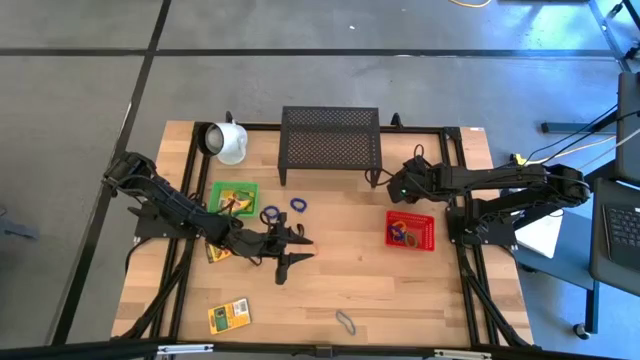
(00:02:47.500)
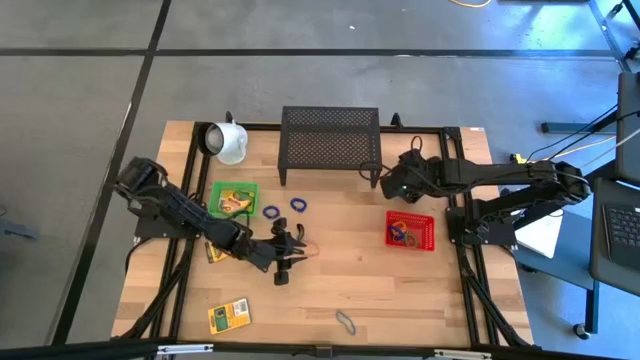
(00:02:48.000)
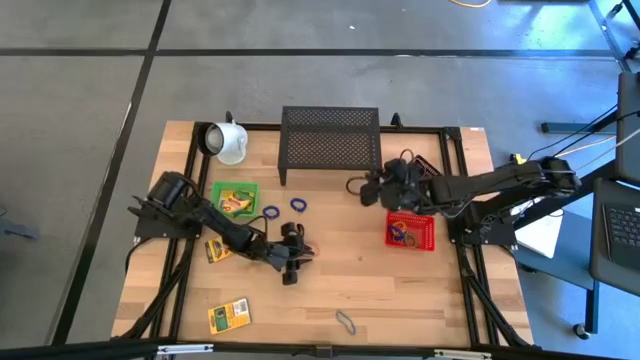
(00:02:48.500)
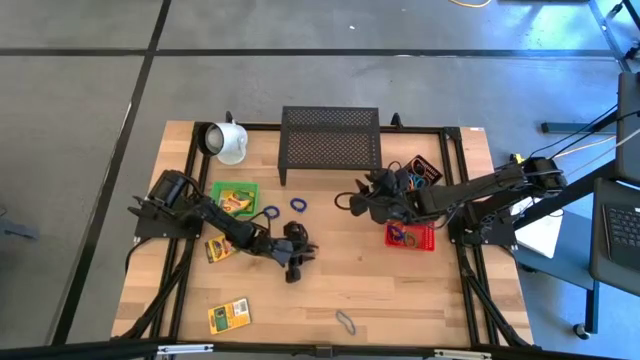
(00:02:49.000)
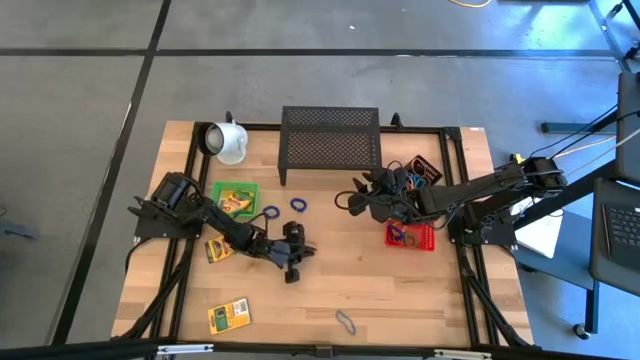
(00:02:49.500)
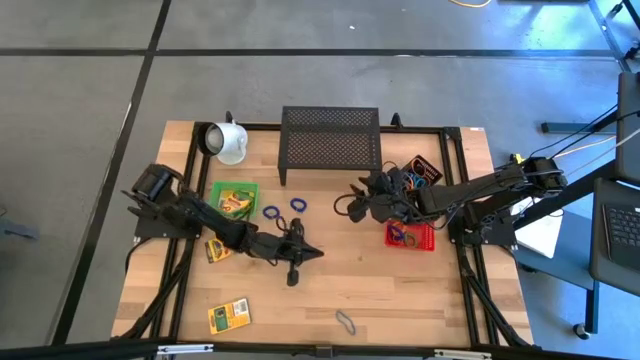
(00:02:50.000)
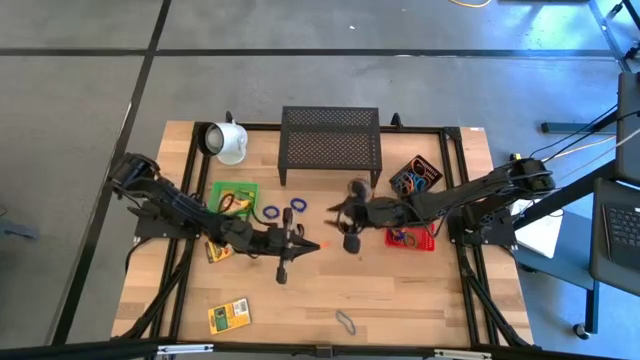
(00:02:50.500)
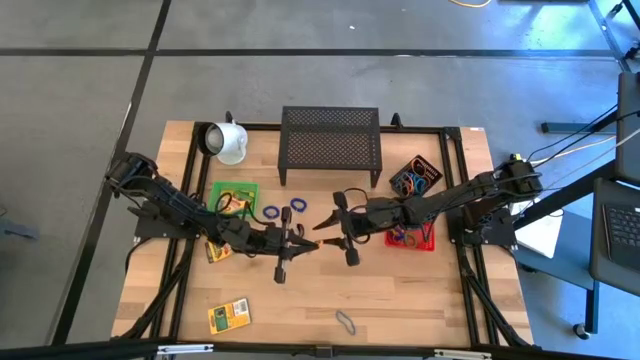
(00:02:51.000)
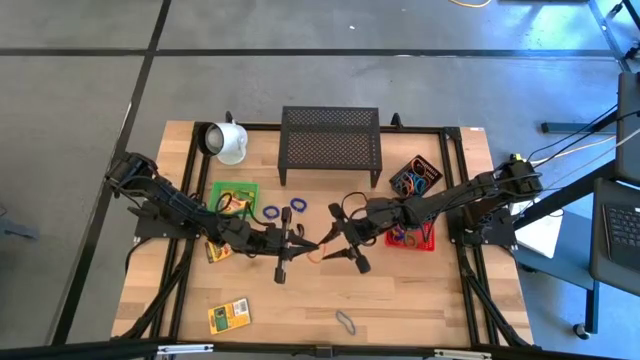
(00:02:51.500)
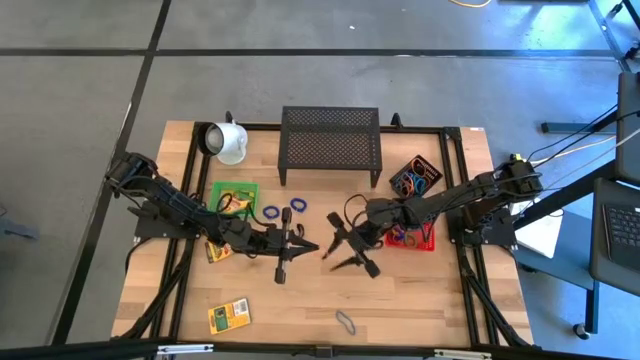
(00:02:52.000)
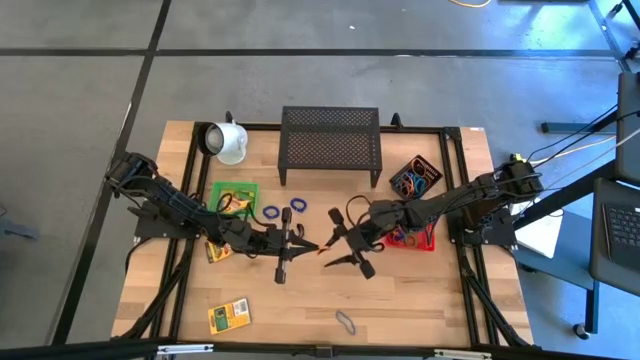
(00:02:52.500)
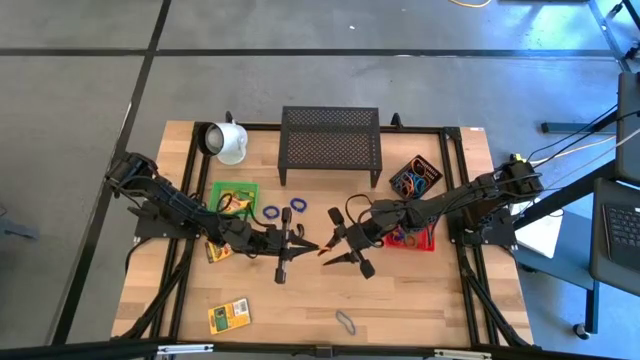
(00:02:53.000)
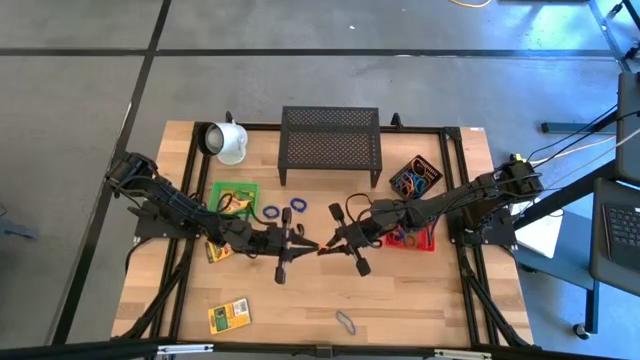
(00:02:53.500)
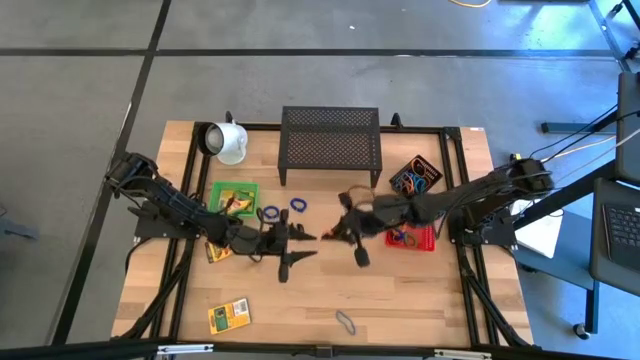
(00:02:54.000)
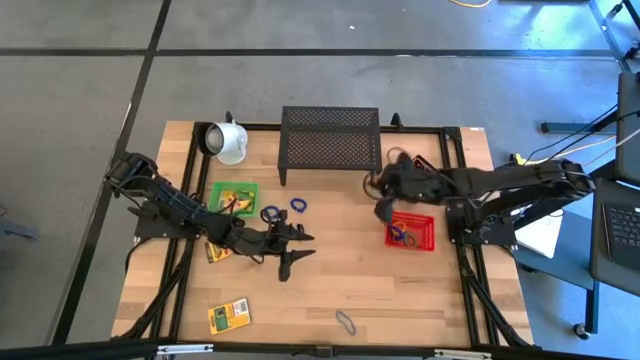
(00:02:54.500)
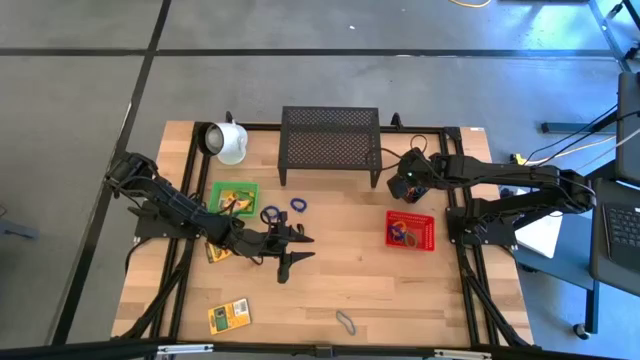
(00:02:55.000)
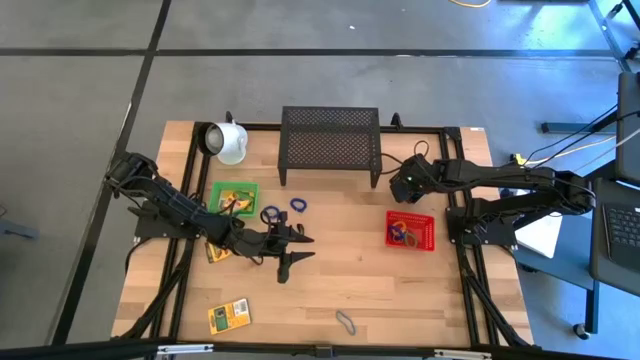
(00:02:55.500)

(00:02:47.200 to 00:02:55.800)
Task: Pick & Place Office Desk Supplies
Put the orange rubber band into the black bin

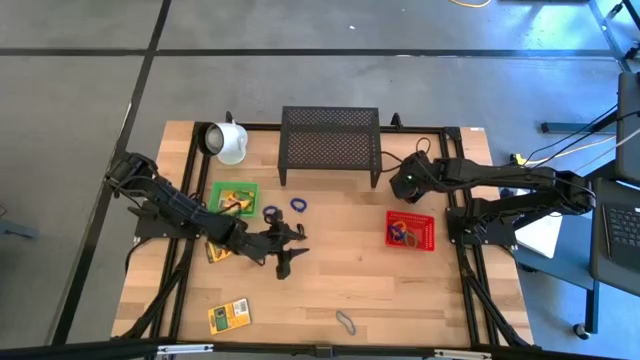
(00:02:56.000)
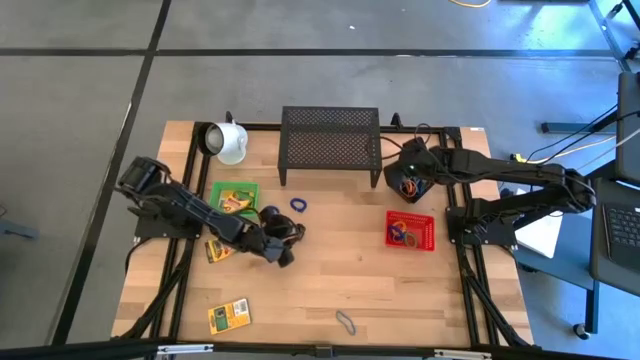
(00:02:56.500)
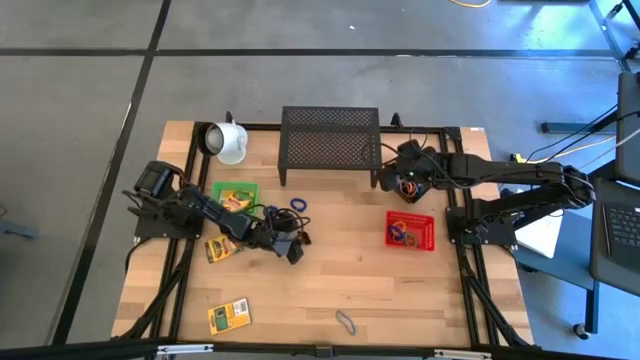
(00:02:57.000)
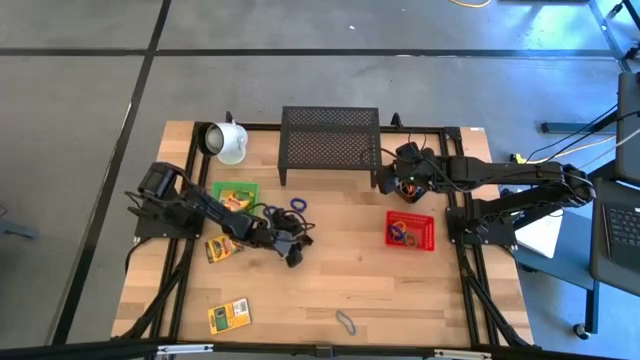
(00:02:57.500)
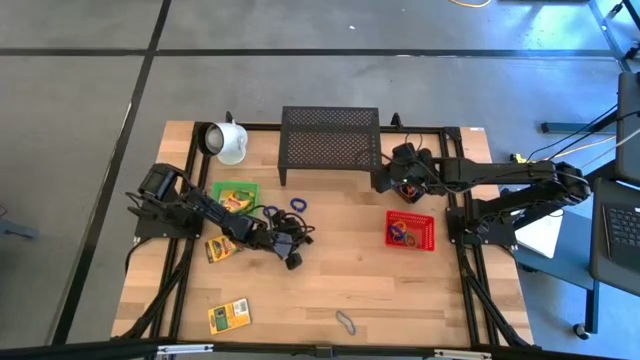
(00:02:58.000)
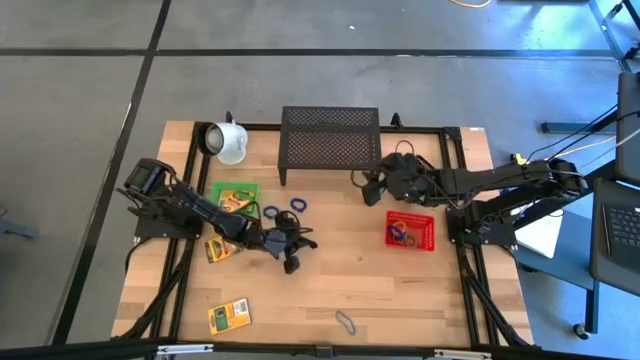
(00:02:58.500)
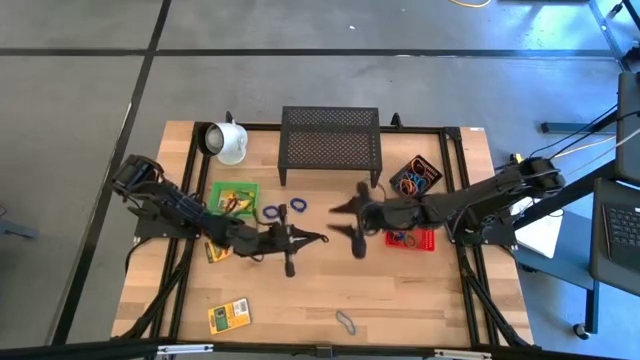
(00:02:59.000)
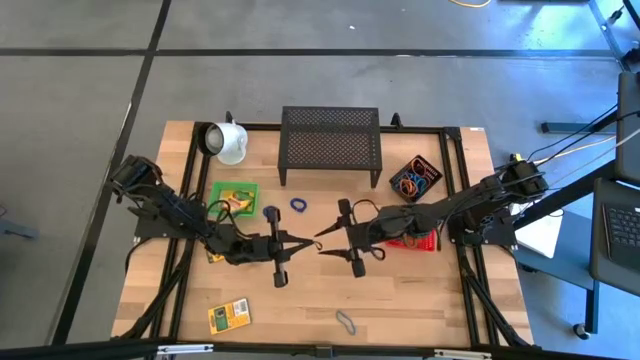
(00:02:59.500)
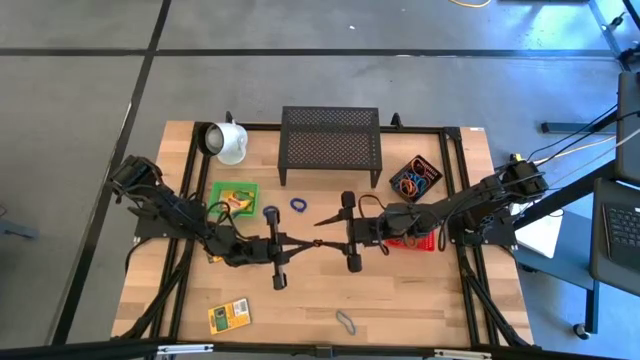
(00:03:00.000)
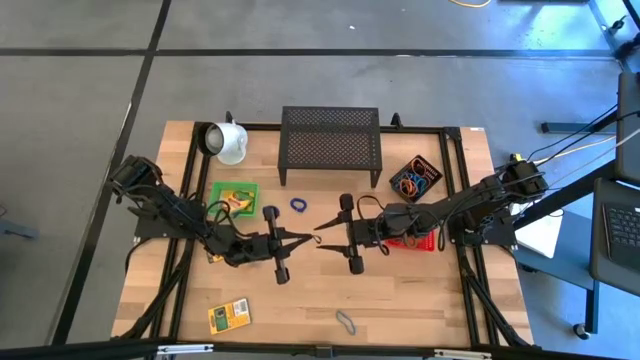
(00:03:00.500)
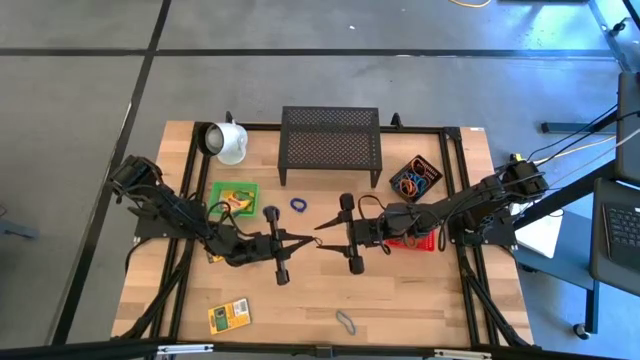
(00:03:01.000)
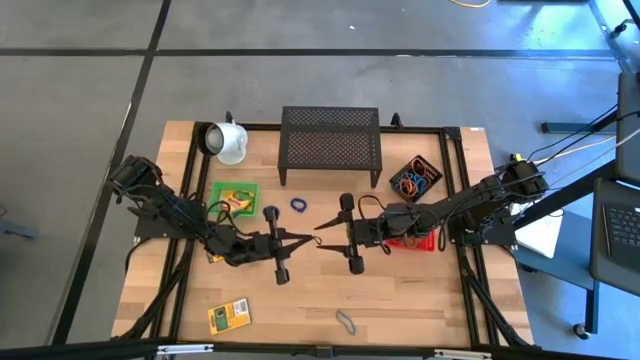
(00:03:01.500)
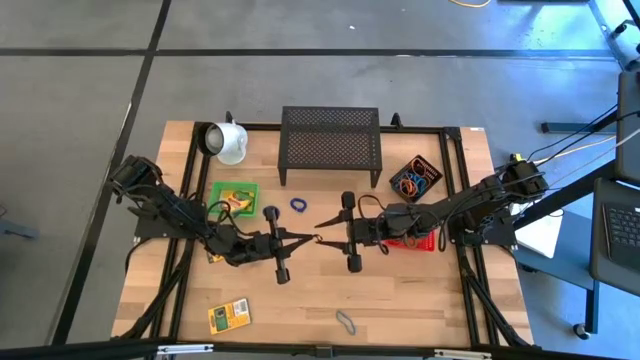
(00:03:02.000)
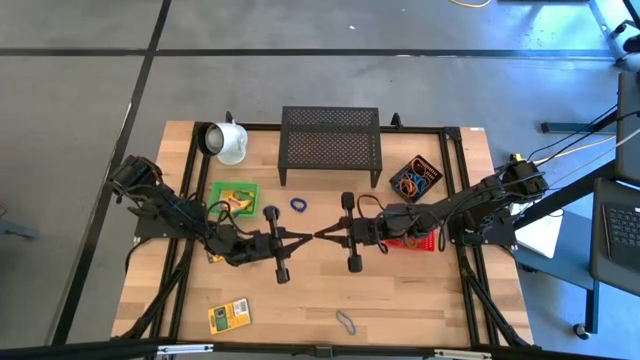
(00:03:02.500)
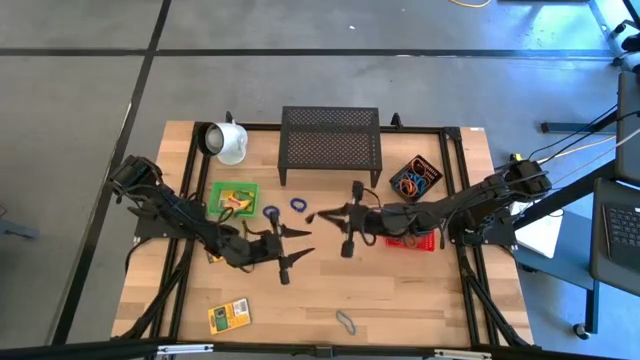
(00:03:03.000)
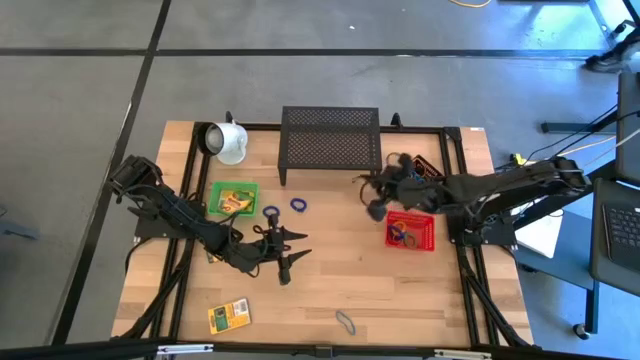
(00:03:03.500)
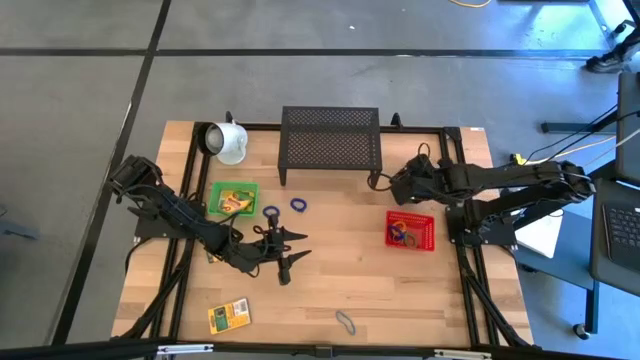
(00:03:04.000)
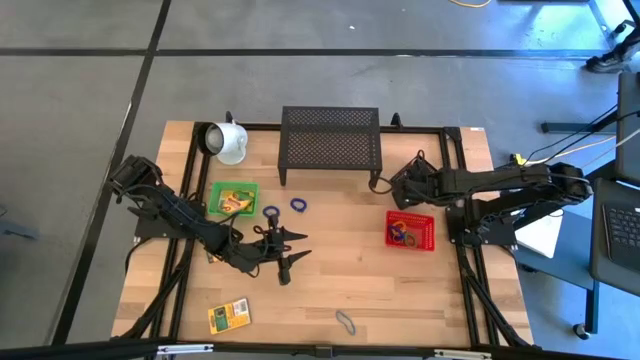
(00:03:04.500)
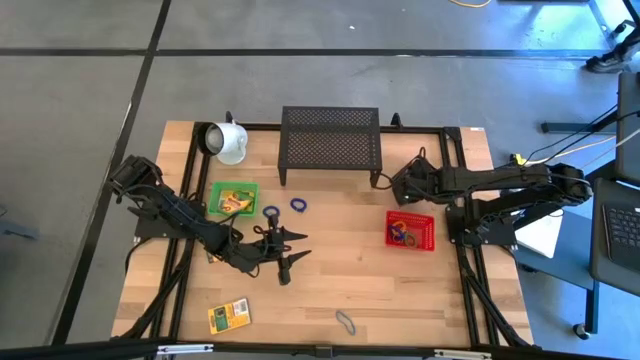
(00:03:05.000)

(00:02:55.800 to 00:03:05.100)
Put the black rubber band into the black bin
